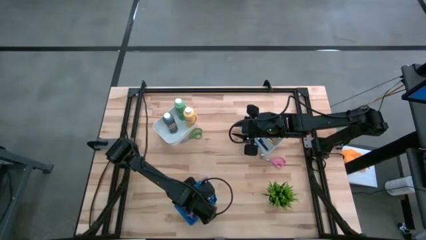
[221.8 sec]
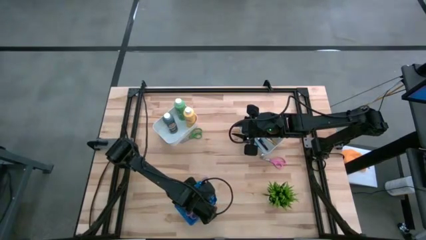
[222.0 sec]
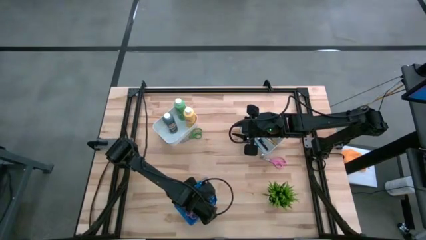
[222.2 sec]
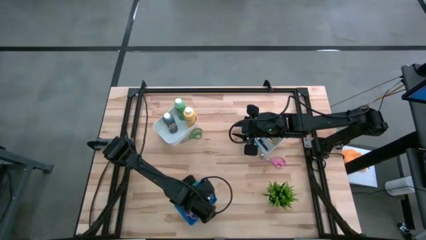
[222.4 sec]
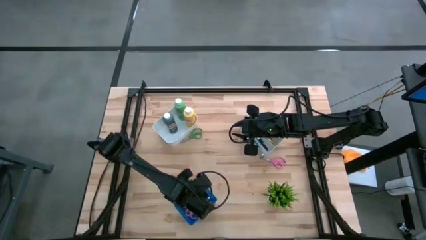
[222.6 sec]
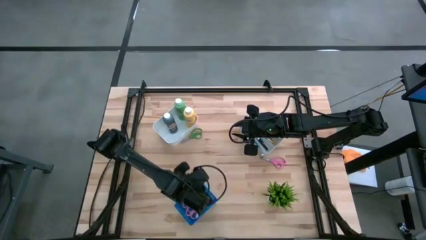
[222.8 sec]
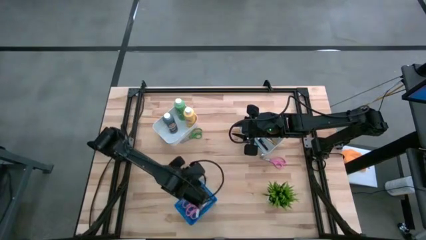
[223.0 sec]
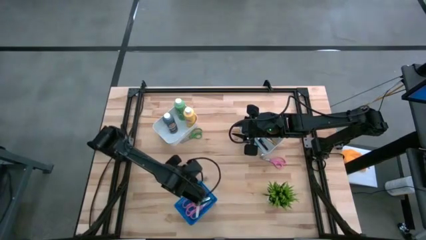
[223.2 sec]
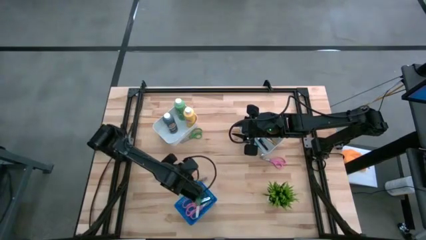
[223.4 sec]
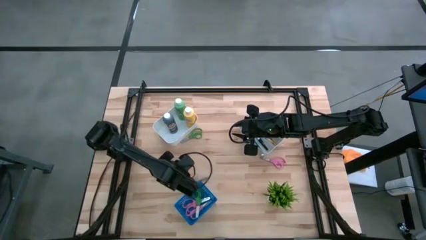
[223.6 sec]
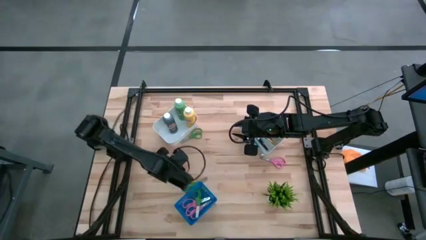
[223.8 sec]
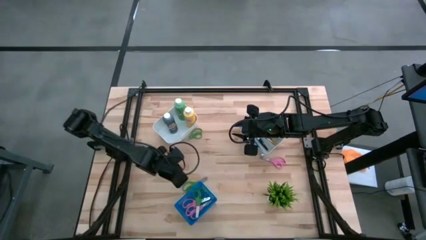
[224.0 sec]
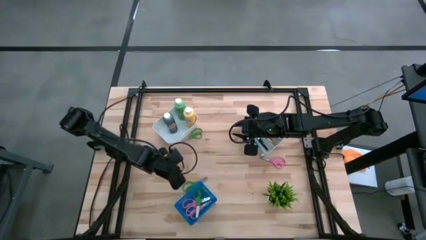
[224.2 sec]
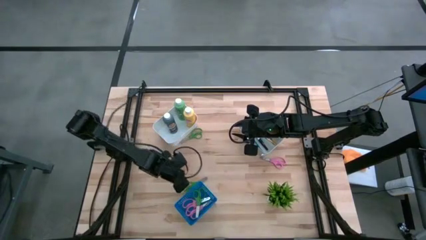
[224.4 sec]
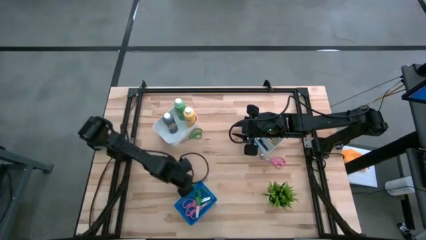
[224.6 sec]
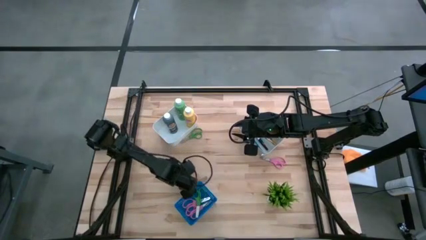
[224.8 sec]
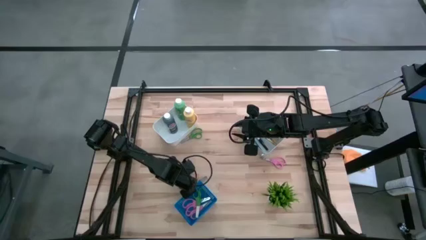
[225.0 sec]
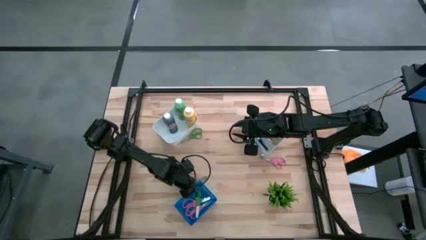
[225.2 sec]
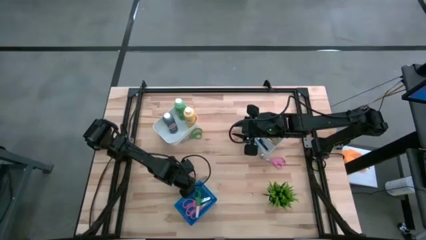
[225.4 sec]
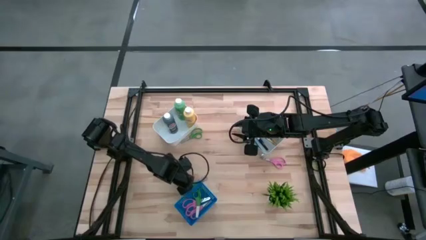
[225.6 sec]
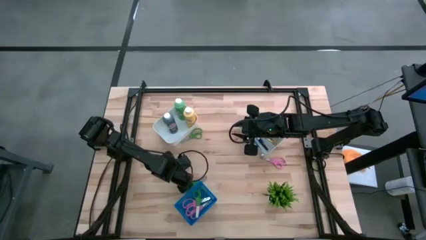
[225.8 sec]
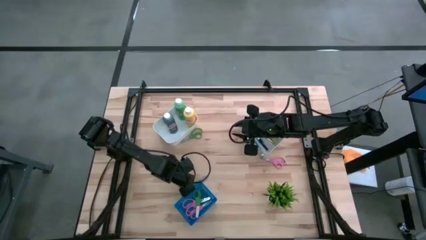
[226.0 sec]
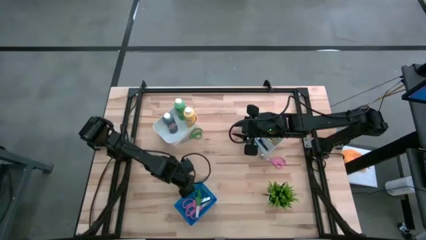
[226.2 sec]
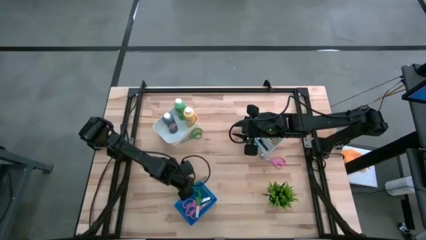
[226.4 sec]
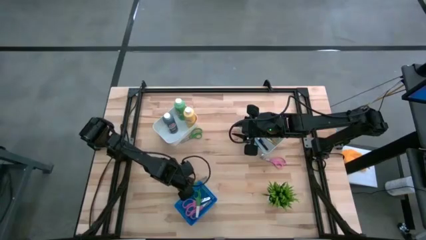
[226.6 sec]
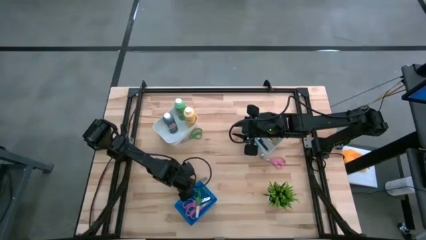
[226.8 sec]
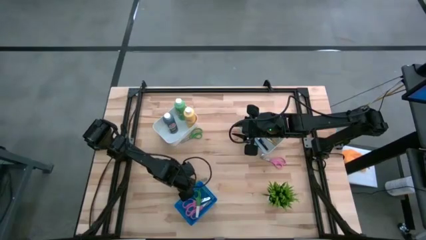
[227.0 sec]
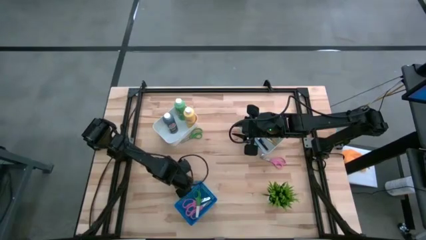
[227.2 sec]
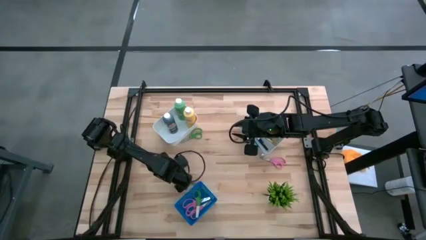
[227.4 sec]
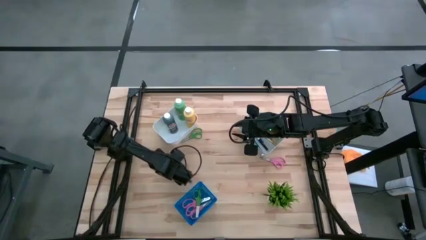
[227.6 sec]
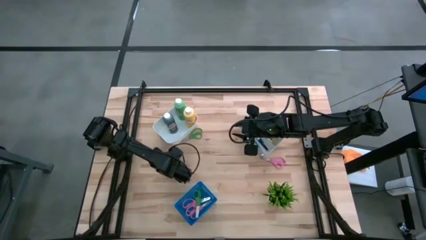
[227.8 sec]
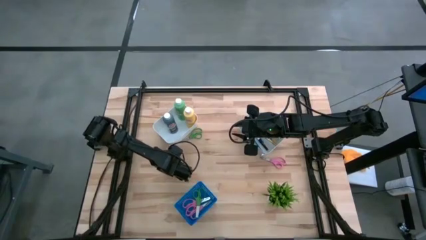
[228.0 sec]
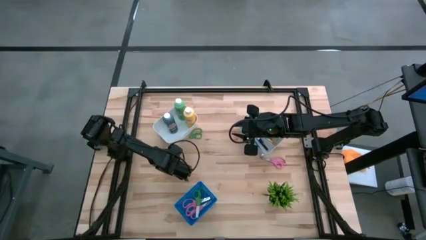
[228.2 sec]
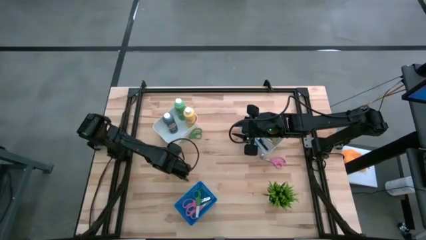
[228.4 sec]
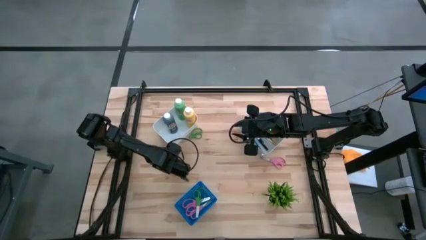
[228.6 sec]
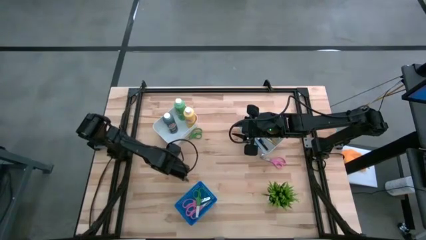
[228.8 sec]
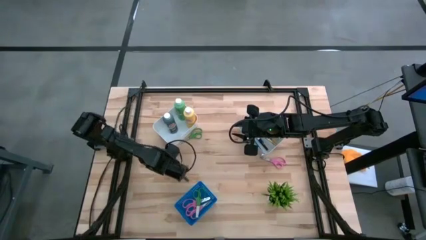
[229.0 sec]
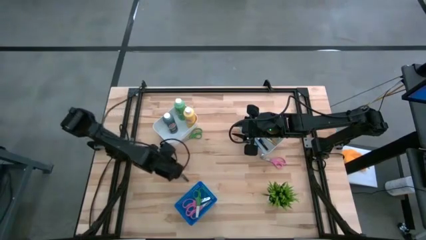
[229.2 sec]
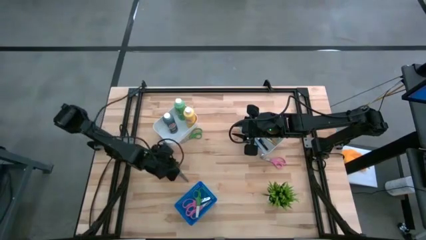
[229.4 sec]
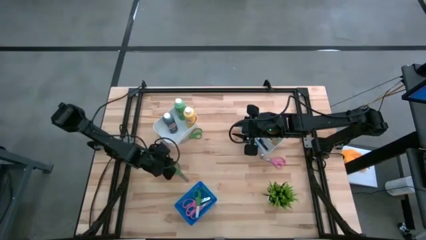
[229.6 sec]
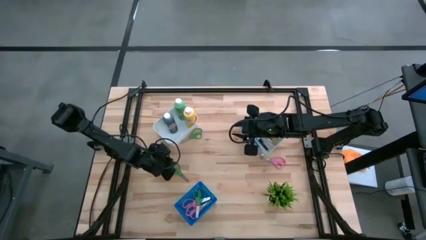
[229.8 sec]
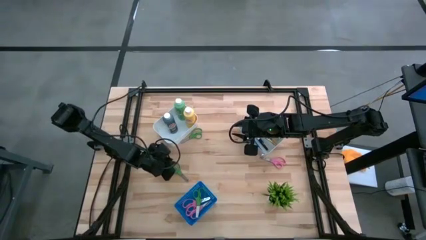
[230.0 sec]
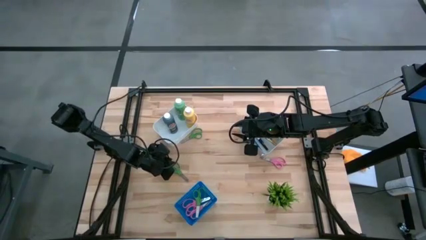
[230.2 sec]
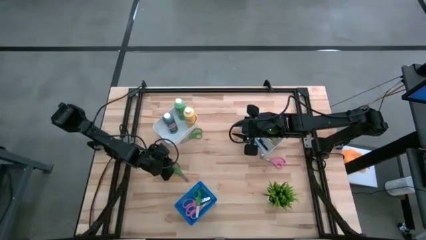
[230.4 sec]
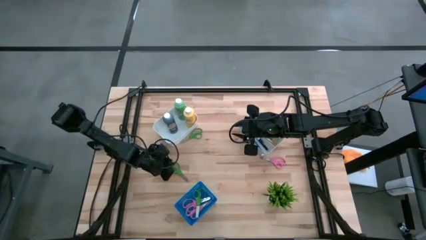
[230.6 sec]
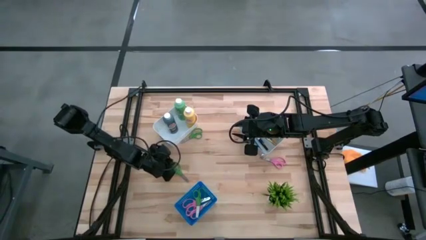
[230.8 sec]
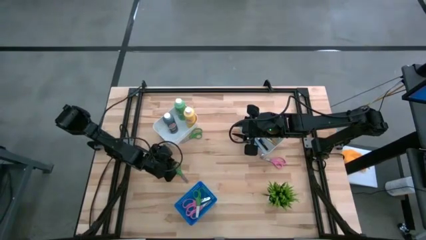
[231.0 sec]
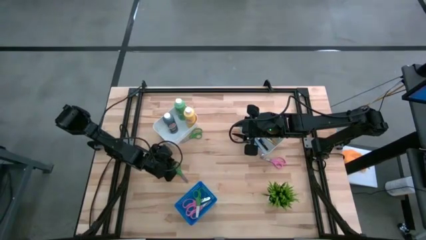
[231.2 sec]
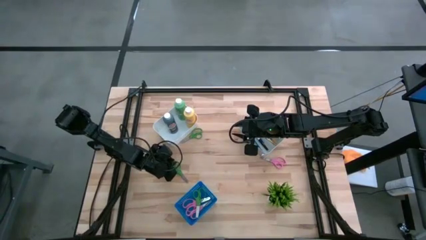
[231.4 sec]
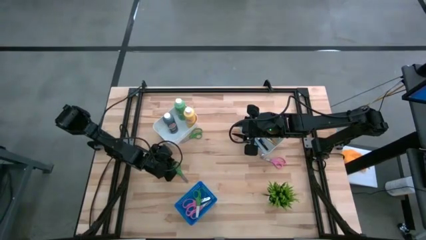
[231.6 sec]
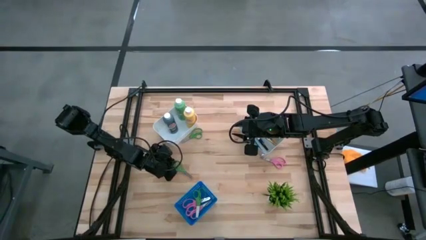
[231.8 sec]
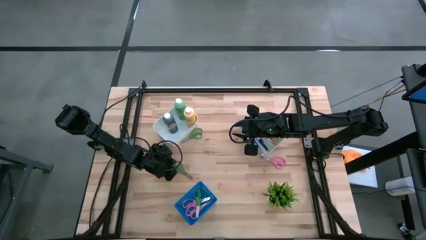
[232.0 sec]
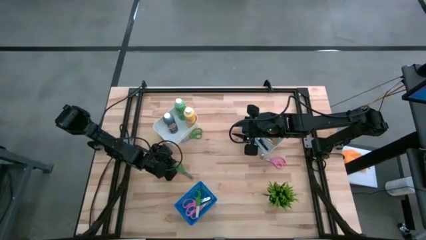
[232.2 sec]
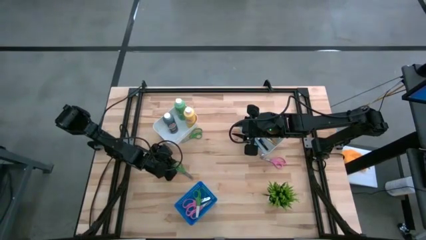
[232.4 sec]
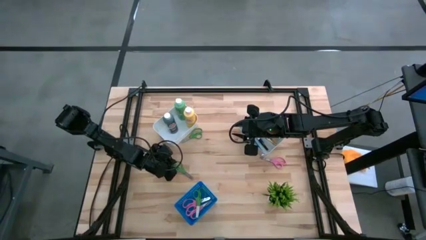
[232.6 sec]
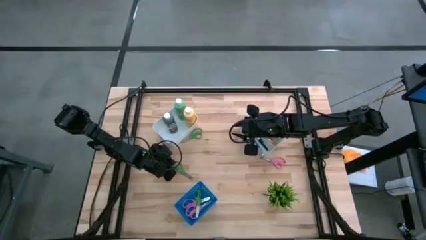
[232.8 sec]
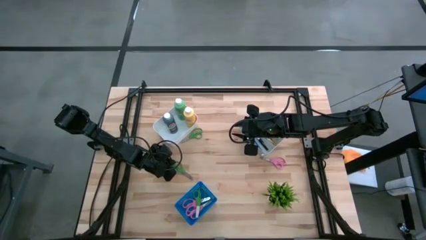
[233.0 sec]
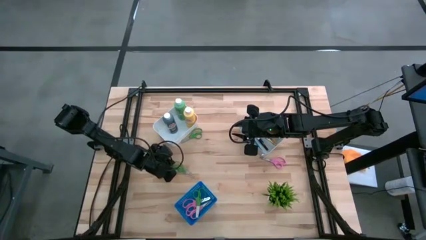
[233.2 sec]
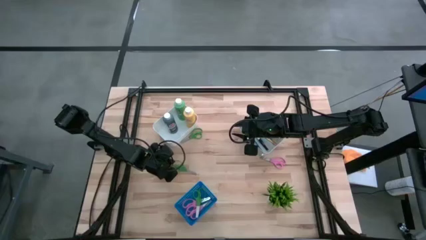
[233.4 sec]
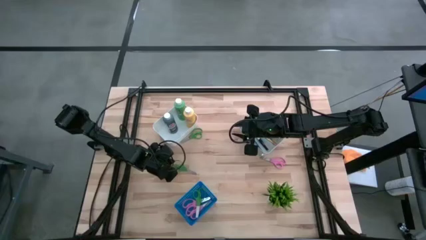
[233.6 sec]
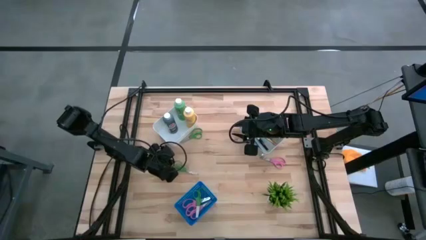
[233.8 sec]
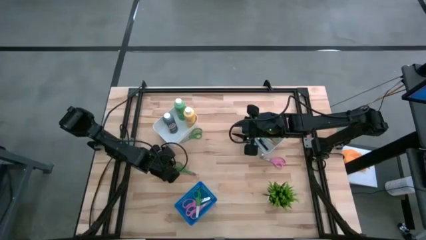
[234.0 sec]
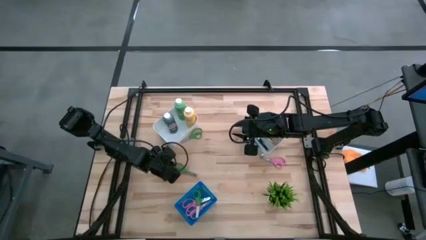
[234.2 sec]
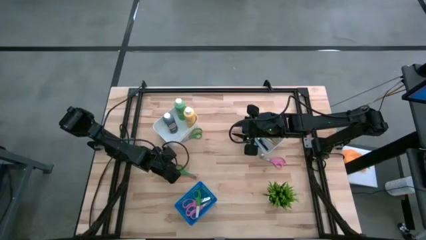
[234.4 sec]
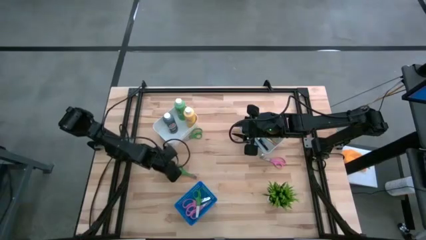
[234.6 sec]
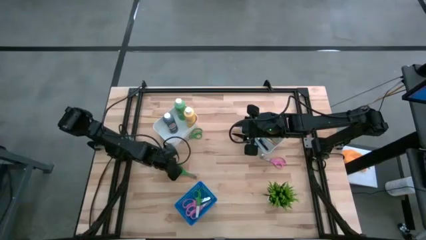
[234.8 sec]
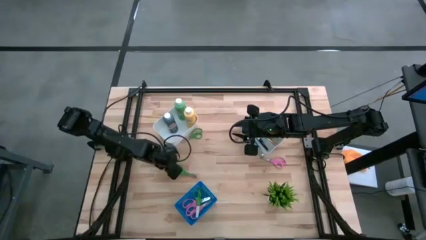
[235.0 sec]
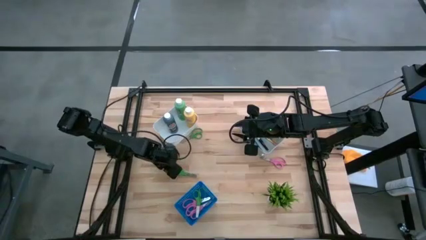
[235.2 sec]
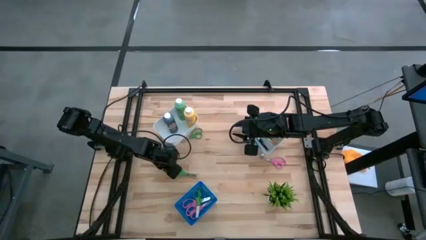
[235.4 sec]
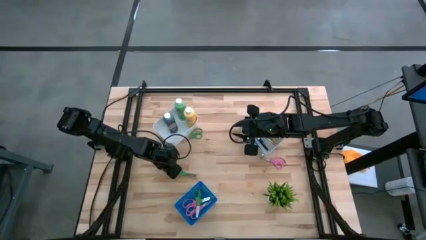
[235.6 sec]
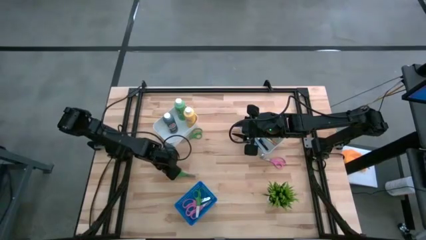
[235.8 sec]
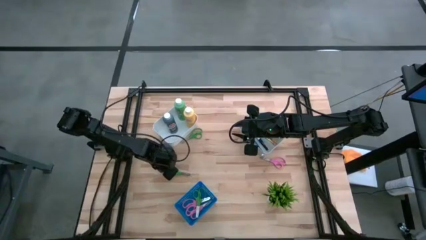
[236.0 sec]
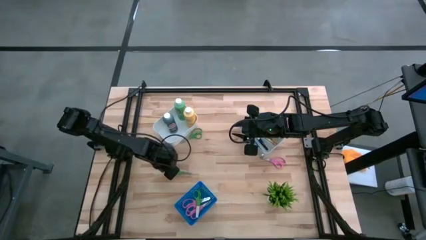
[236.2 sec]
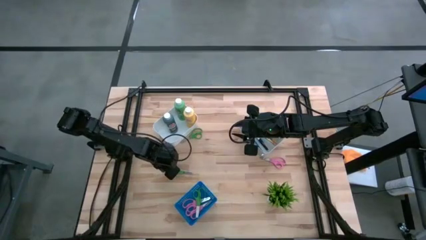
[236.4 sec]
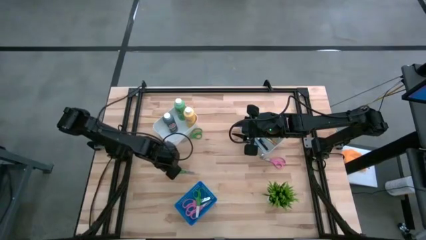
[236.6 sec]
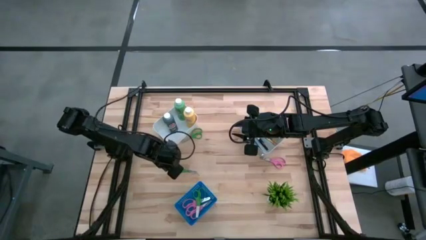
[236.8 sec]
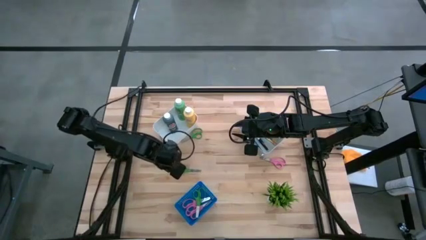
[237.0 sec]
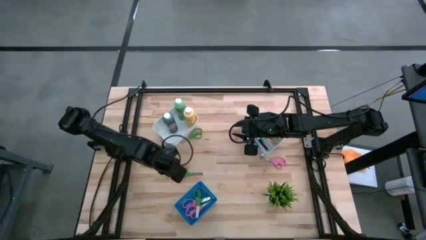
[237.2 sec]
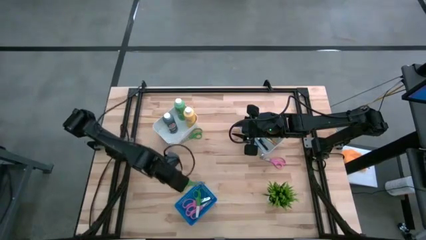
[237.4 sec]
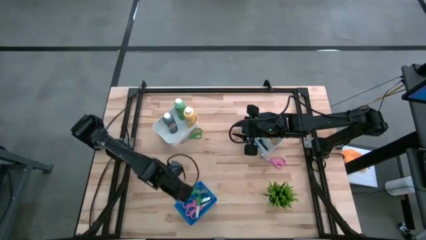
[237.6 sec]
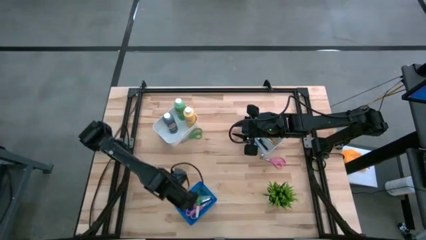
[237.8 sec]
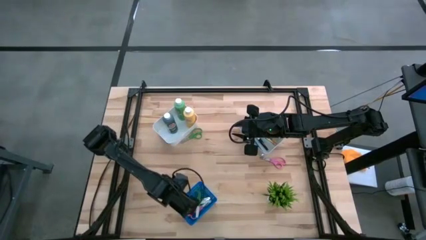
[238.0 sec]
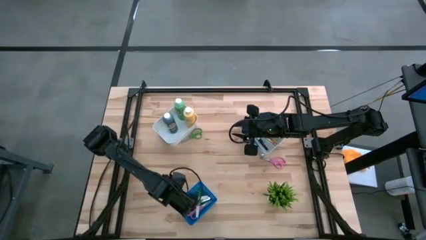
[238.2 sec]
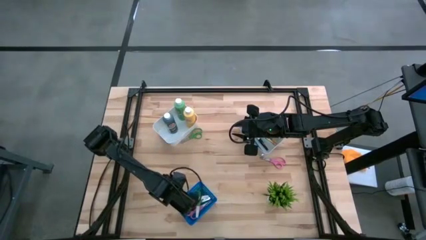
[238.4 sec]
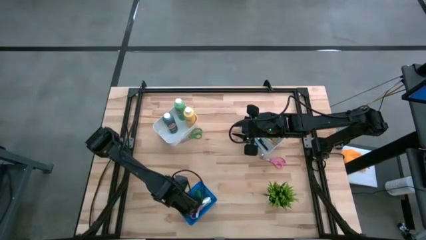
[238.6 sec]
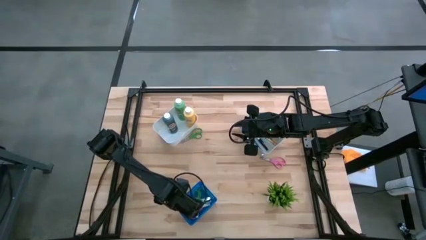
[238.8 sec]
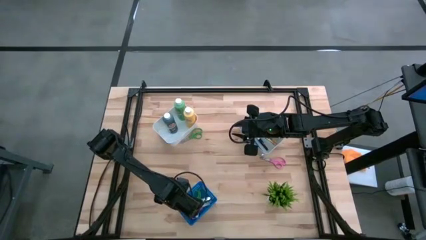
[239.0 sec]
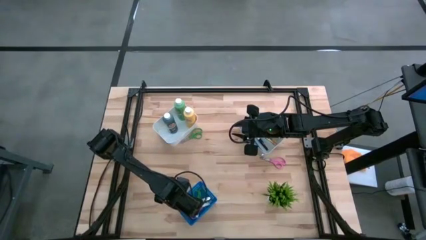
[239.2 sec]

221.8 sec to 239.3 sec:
Task: Pick & Place Paint Supplies
Put the green scissors into the blue bin
